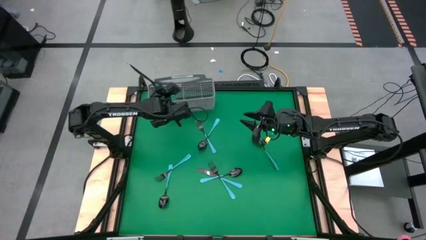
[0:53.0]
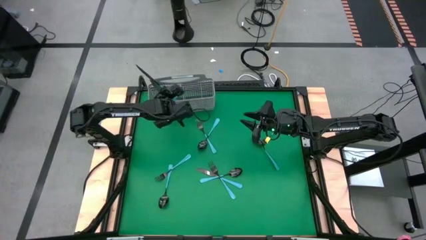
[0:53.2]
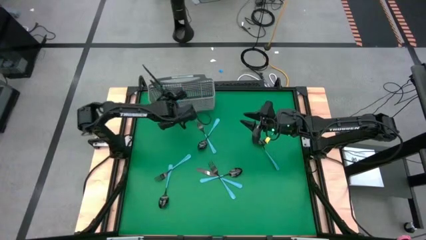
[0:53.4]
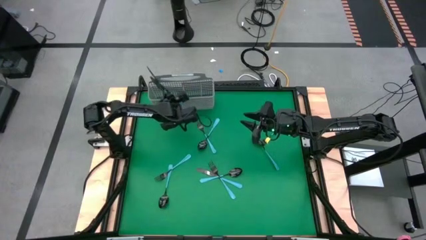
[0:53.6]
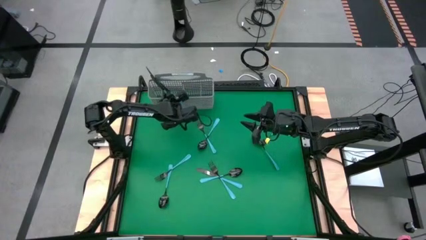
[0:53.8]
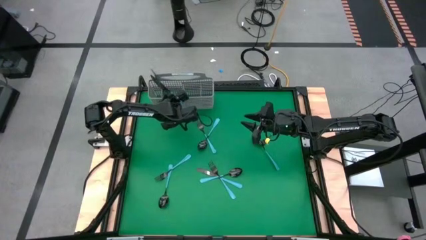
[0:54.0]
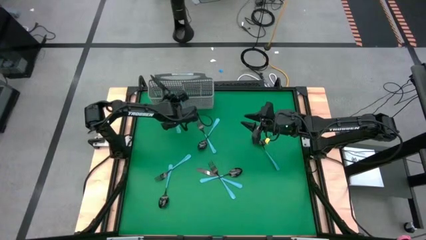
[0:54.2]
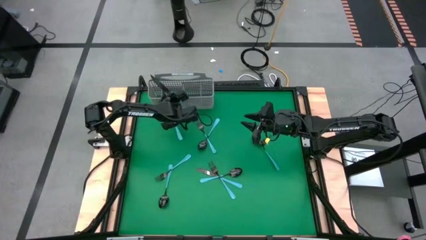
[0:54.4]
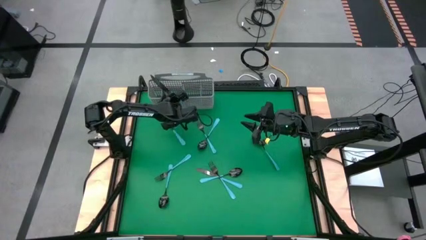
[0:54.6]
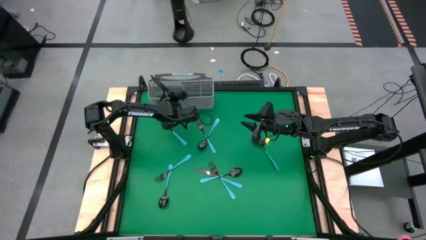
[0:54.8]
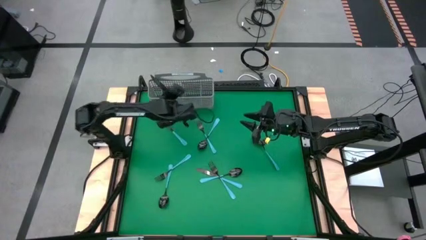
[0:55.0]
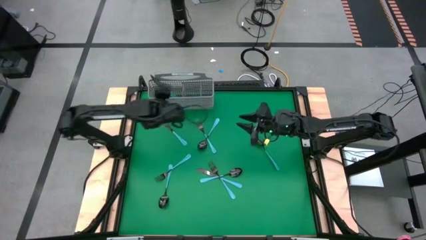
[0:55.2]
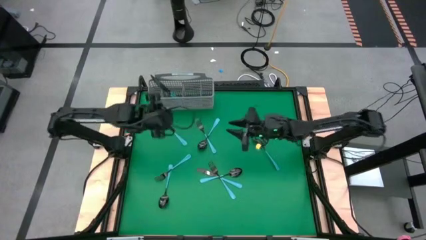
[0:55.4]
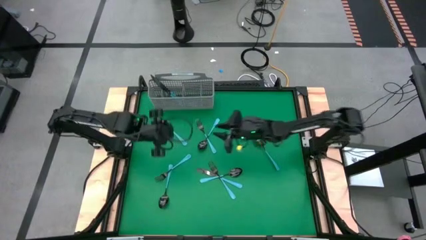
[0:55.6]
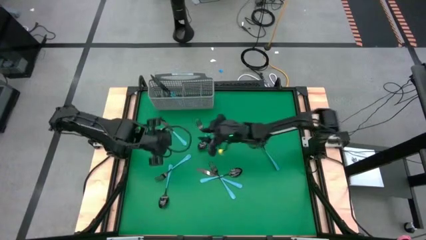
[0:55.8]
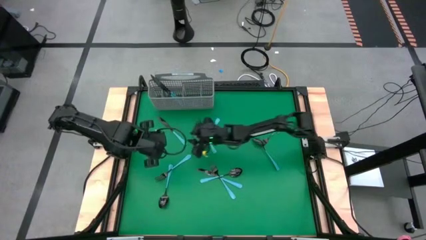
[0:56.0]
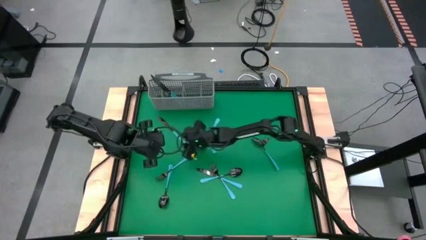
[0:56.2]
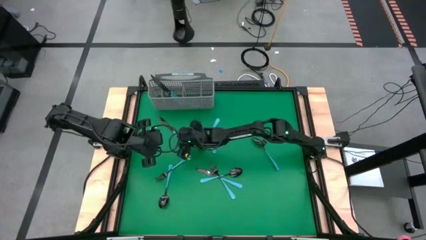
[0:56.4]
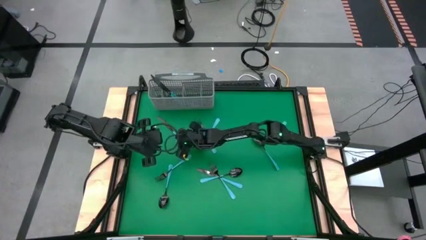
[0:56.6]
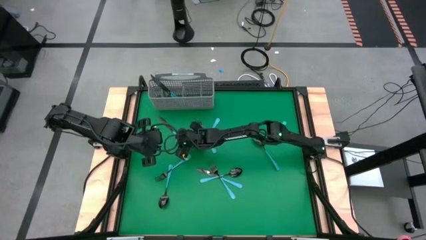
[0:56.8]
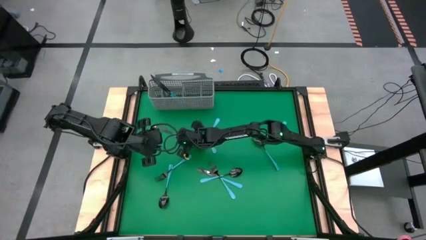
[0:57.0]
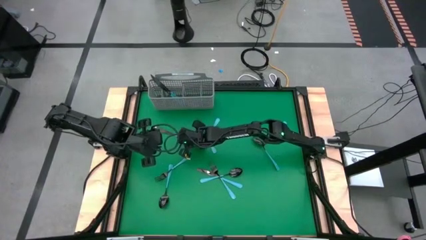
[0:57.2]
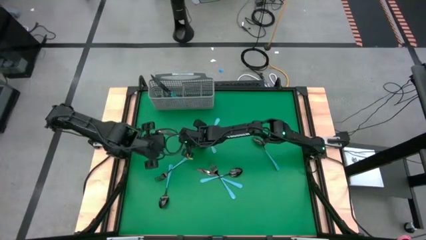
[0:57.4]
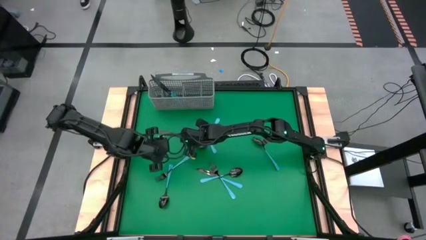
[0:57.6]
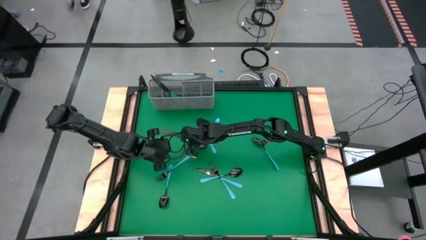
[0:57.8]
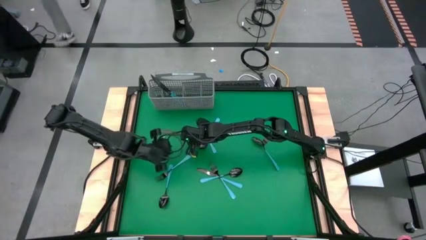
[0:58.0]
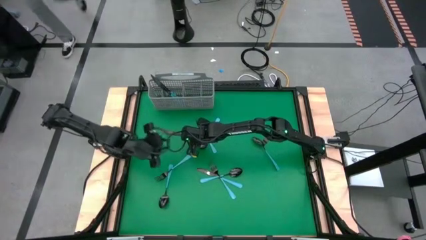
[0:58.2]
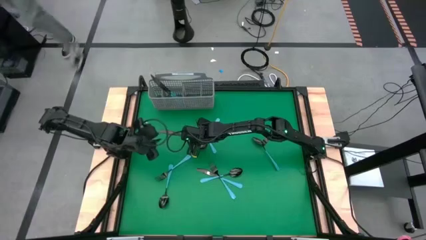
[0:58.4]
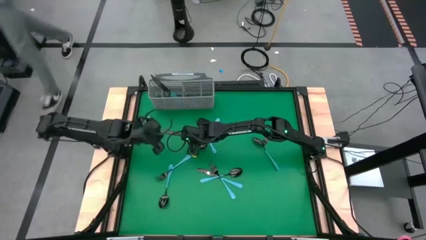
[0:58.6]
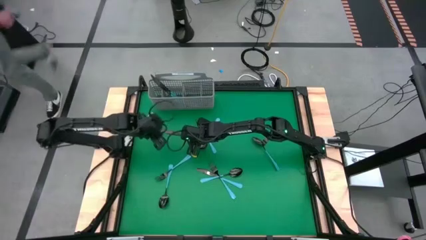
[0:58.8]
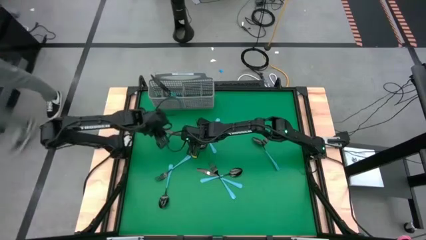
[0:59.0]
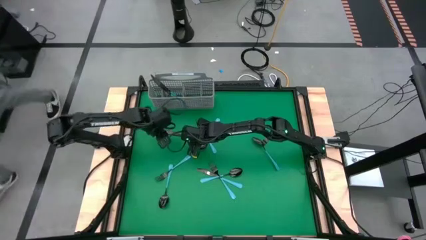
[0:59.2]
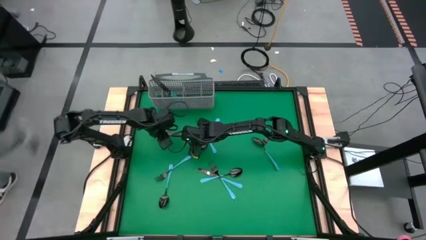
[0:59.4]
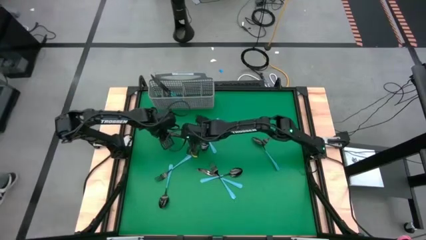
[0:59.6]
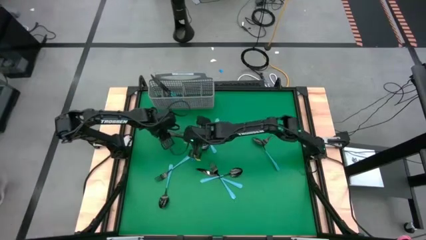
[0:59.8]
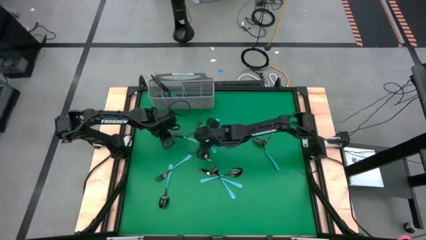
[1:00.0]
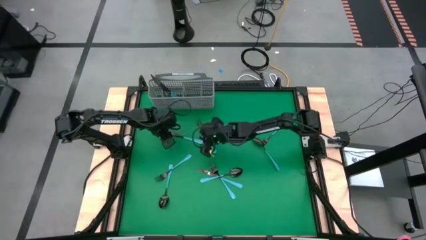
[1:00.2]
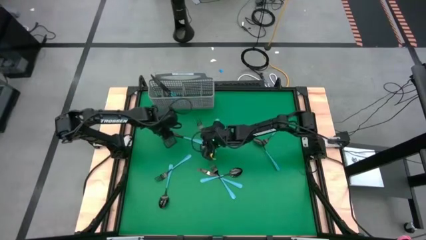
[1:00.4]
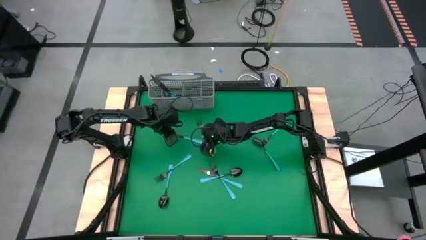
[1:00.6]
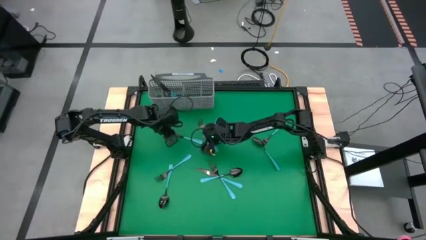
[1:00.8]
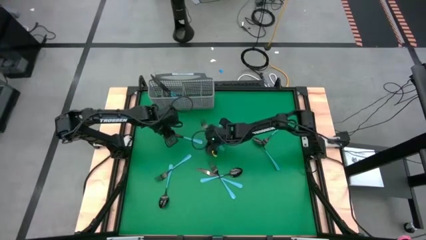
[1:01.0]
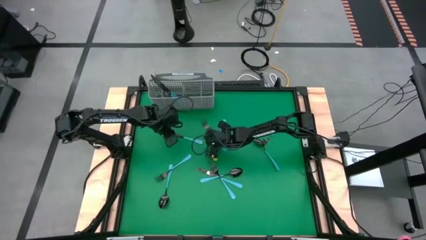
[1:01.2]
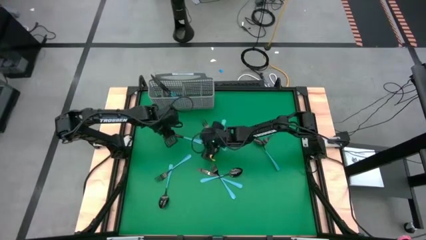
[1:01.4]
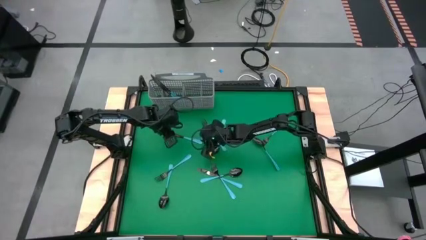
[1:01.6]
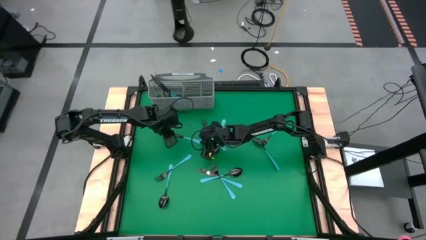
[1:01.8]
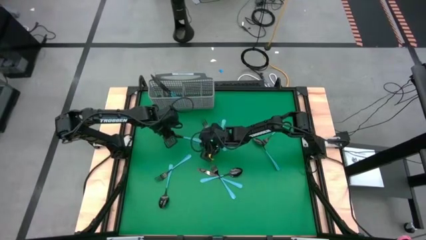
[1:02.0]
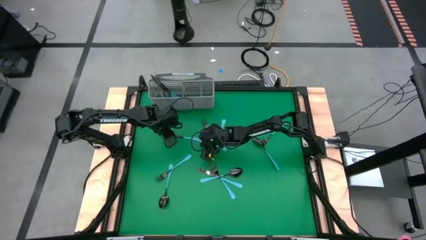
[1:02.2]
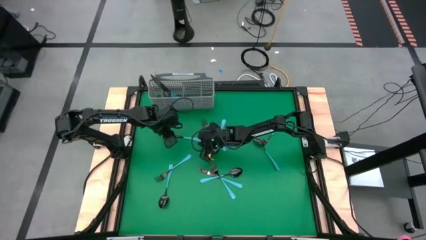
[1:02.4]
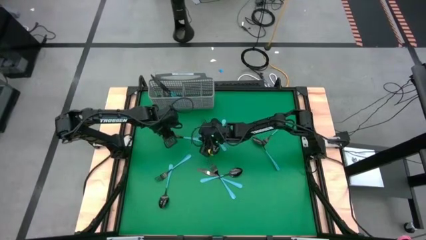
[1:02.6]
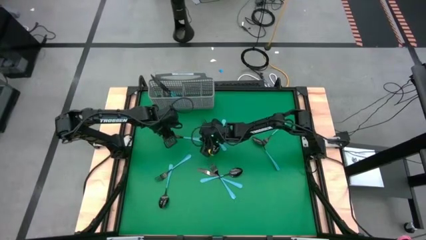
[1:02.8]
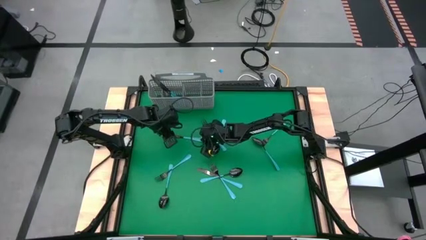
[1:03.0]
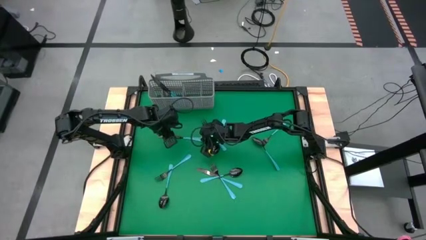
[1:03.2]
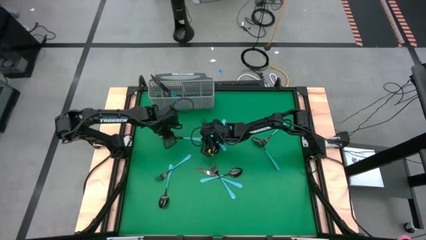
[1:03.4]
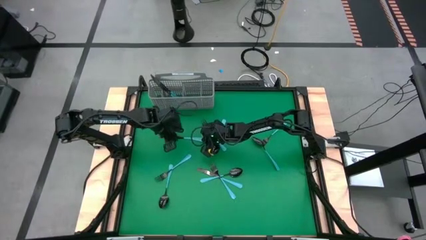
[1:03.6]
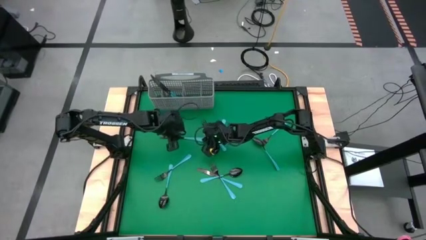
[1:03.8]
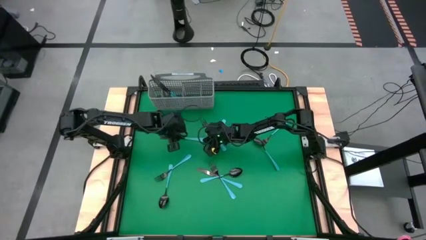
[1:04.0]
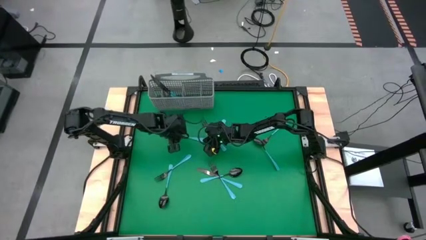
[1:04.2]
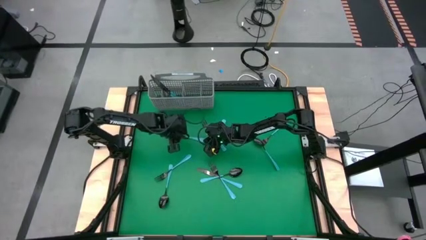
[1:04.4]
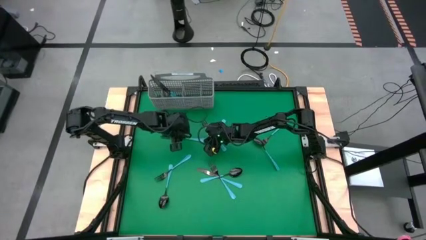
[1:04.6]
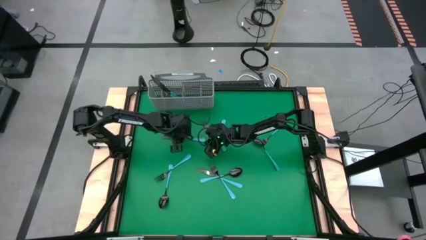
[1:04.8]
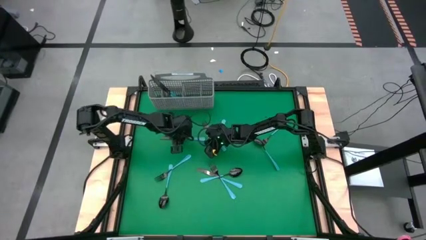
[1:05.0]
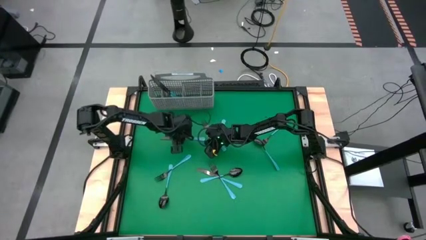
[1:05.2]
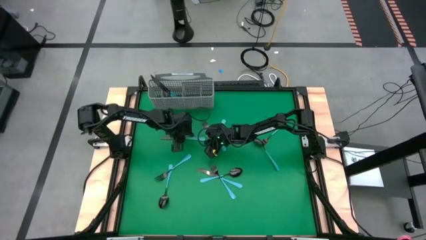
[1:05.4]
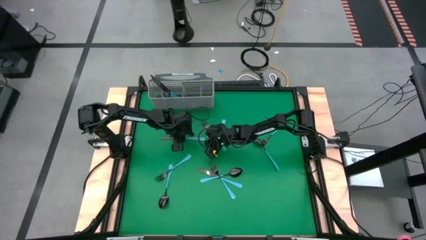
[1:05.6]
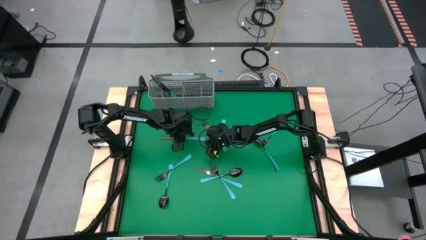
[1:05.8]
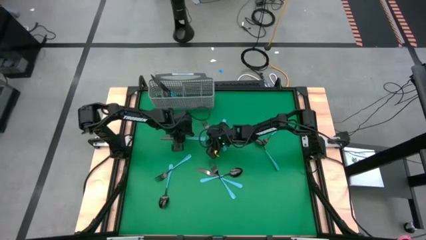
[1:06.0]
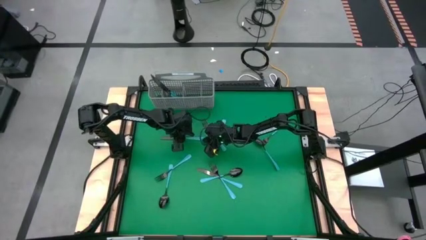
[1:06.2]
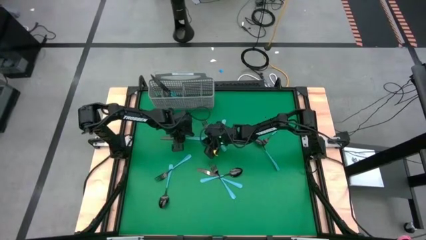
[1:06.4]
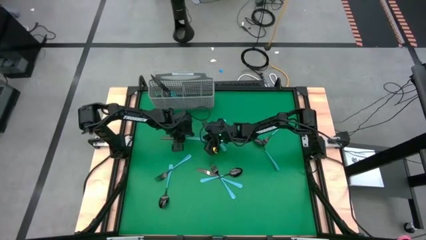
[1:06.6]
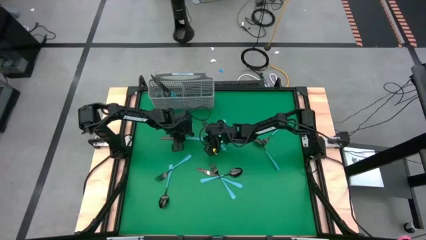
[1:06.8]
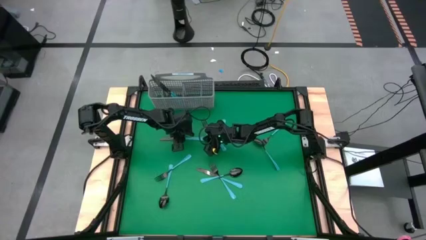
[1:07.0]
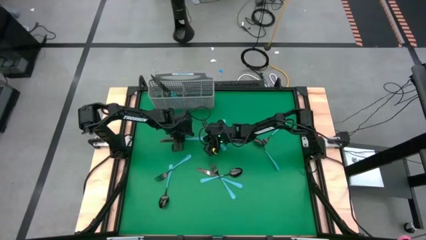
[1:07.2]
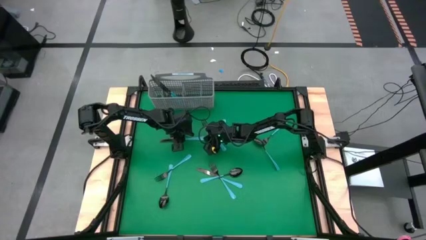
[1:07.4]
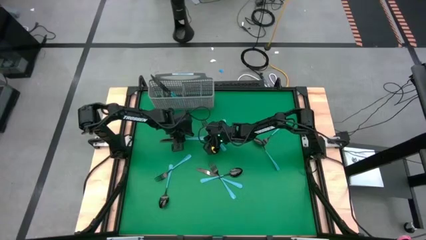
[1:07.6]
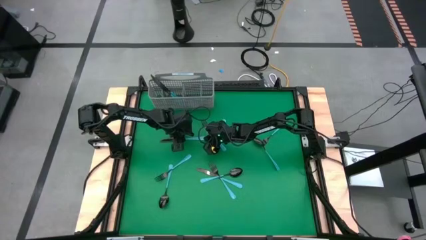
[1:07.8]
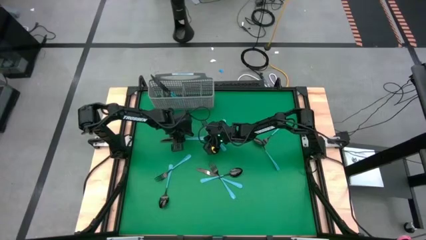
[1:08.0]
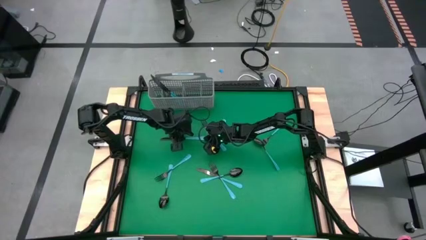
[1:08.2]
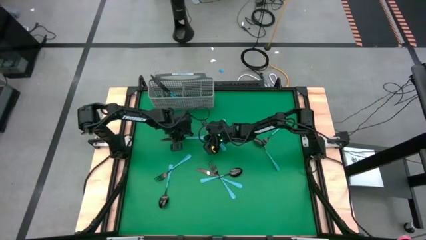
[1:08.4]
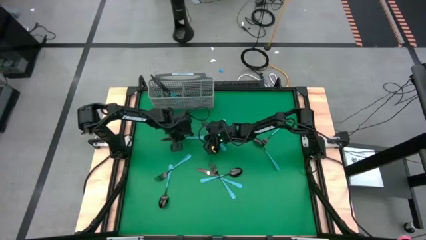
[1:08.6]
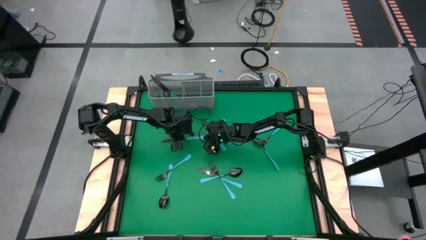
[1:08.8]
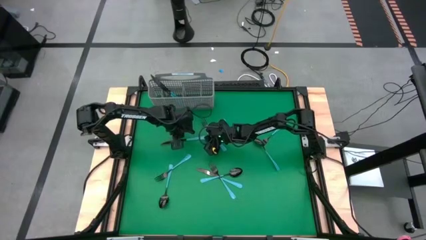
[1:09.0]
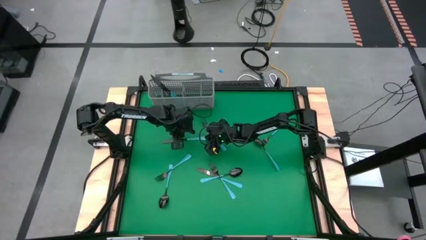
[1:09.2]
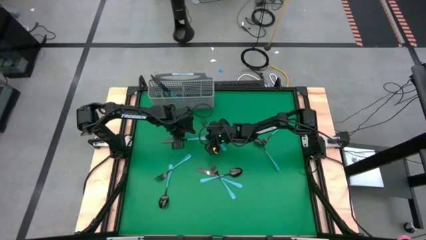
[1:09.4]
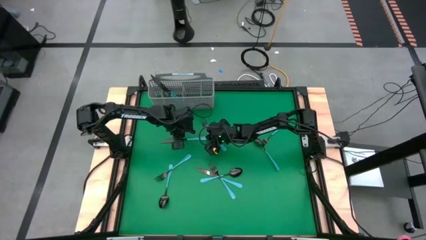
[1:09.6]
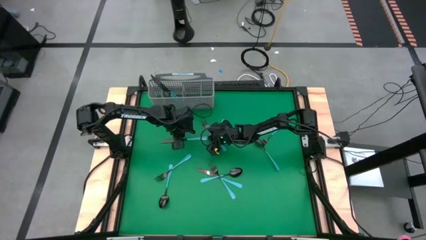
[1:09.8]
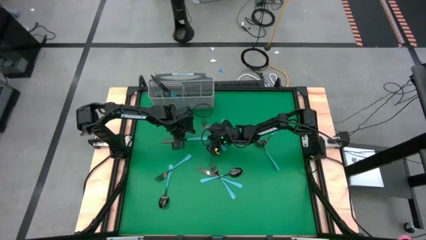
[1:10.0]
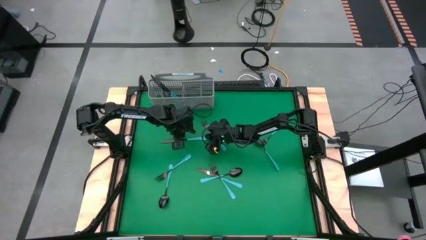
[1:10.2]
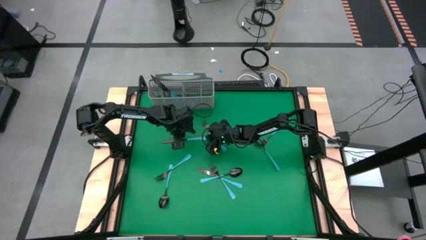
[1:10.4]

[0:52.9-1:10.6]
Task: Sort silverware
Put the table knife into the silverware rack
